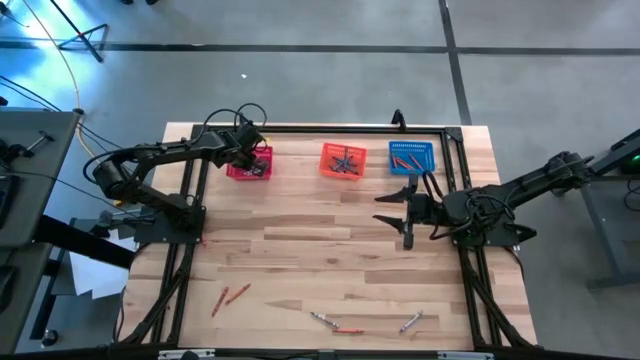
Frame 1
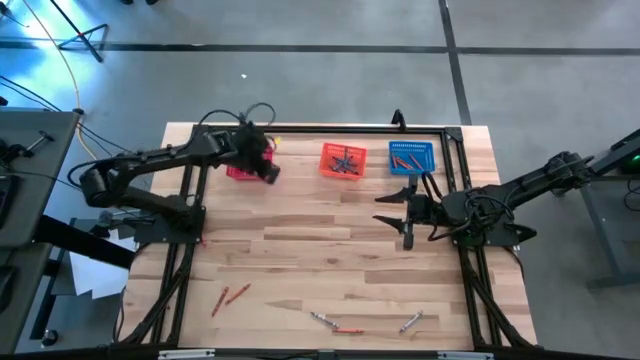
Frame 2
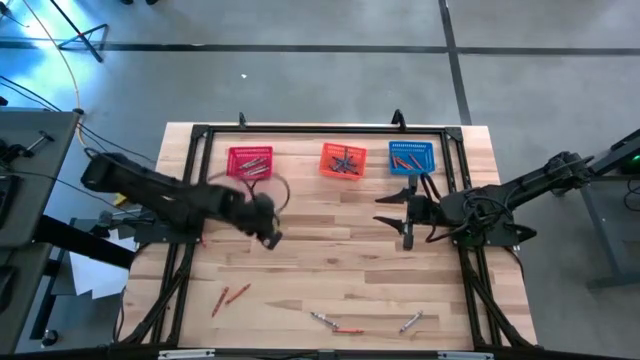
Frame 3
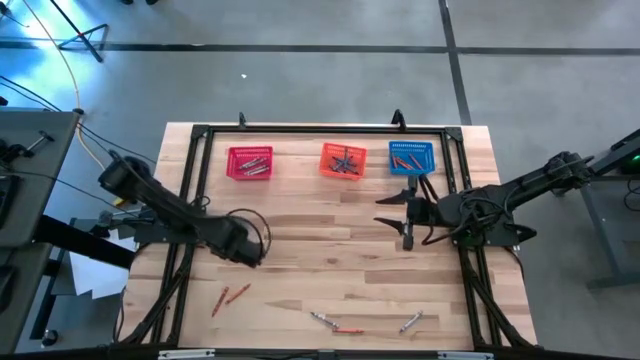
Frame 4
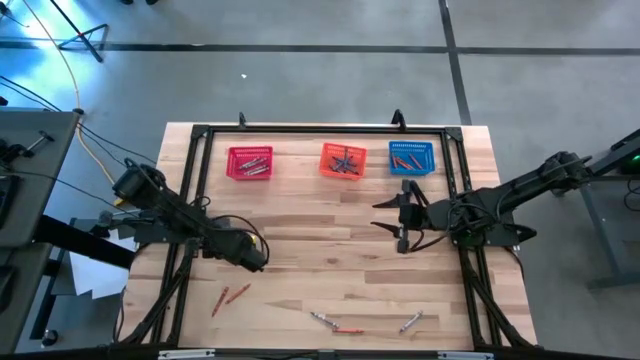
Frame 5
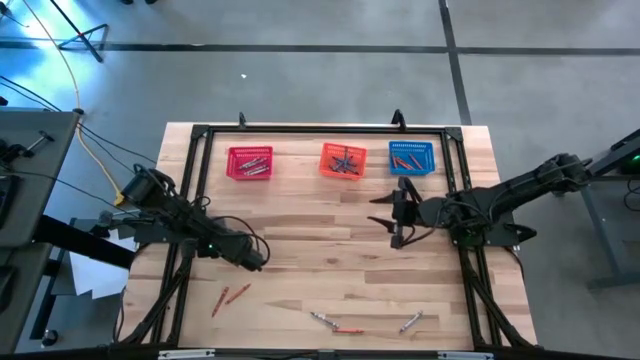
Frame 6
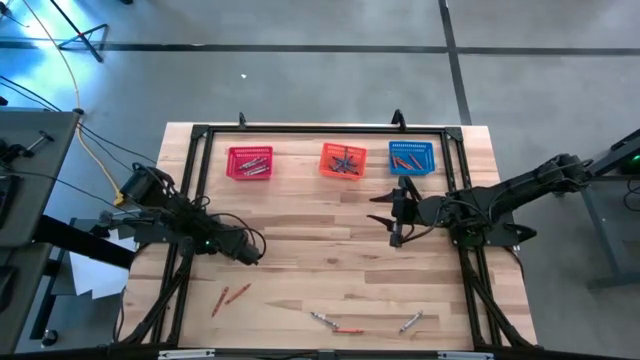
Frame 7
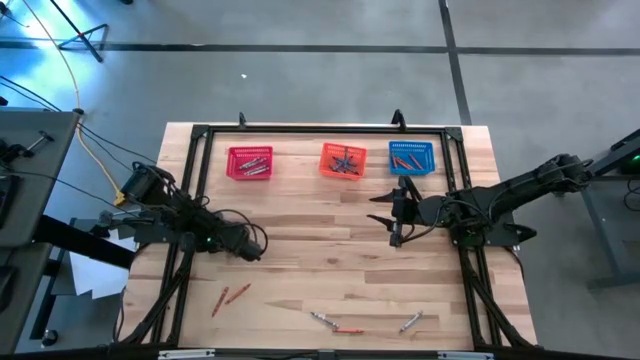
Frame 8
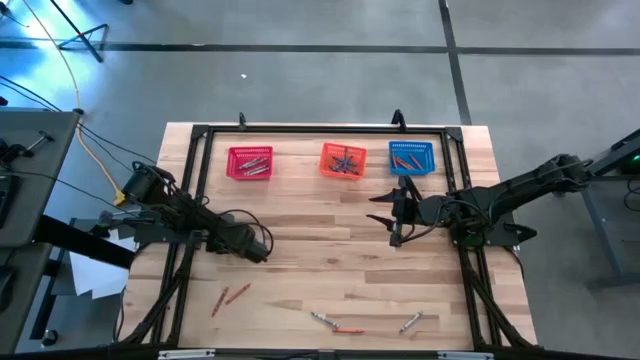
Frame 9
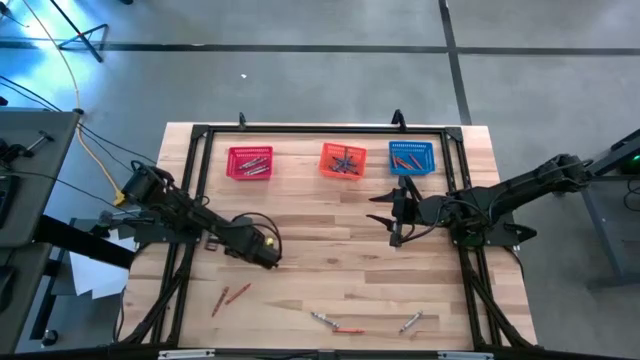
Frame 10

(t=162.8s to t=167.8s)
Task: Sort crayons
Put the orange crayon into the blue bin

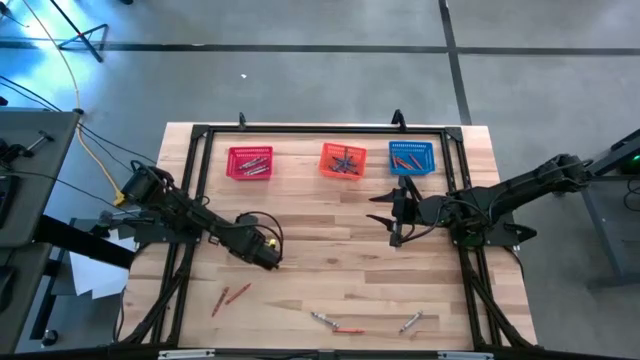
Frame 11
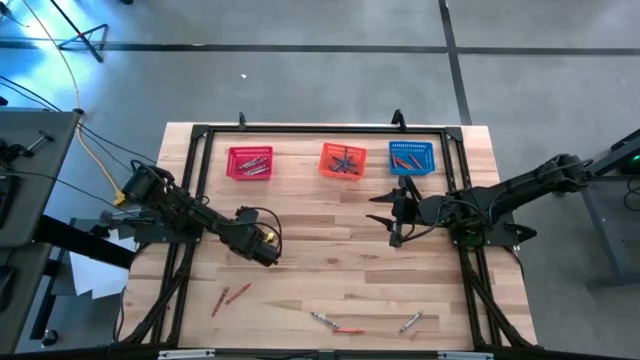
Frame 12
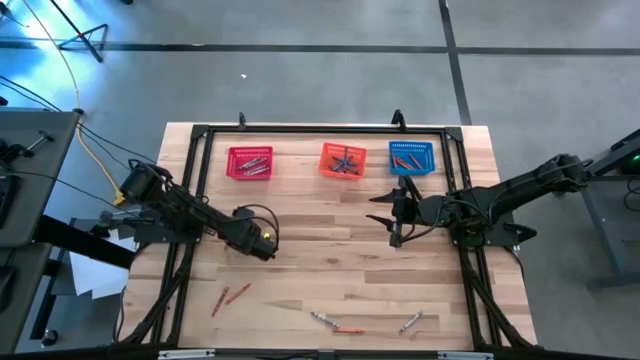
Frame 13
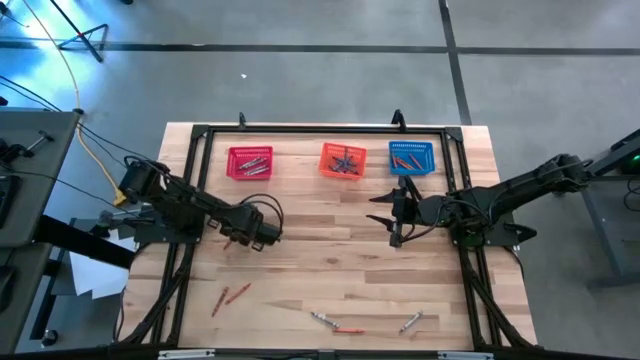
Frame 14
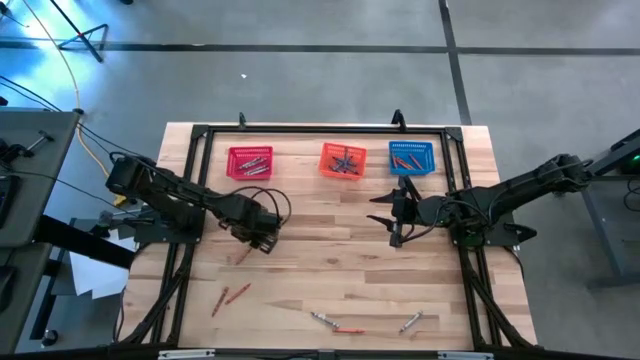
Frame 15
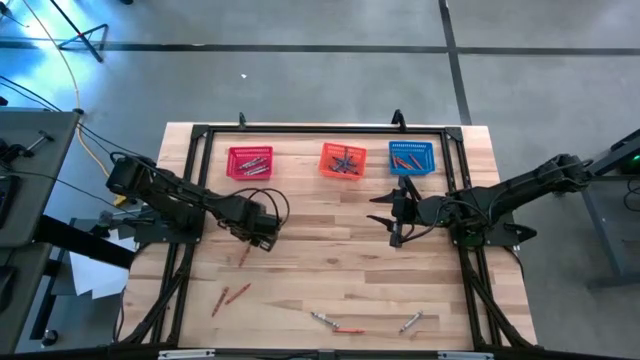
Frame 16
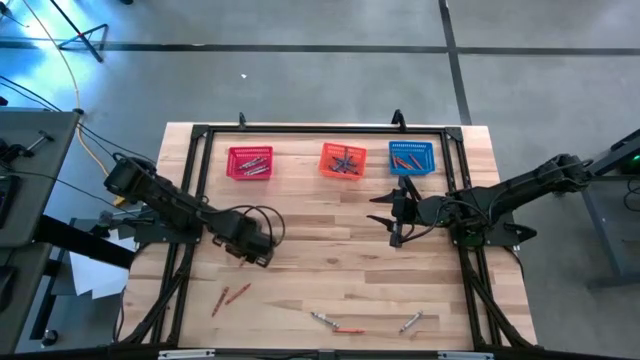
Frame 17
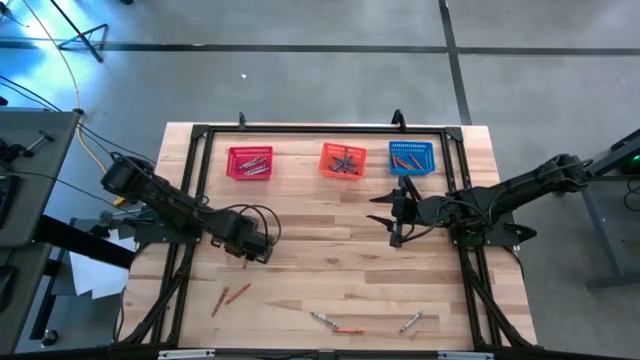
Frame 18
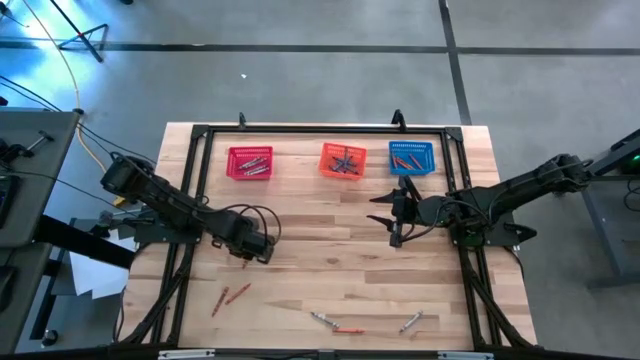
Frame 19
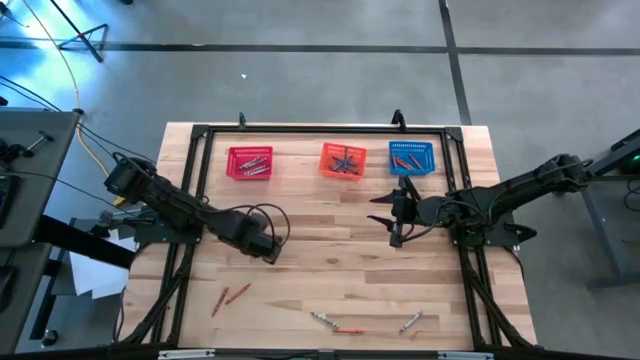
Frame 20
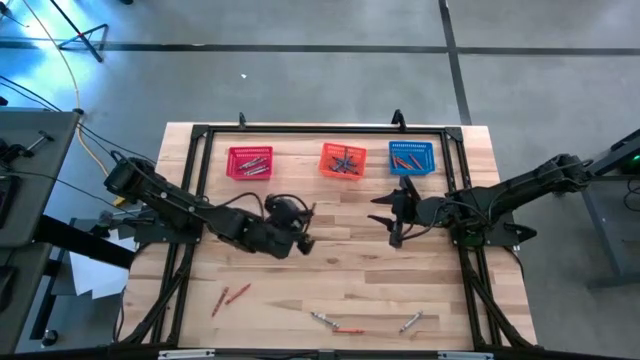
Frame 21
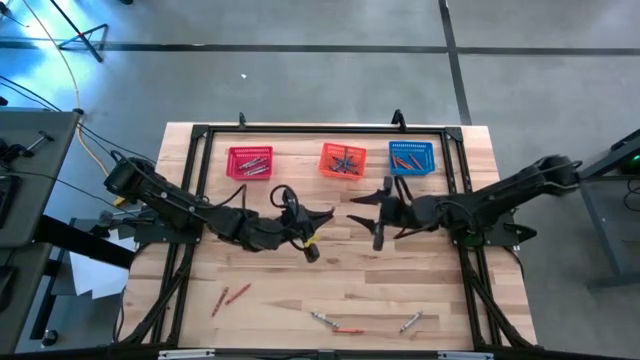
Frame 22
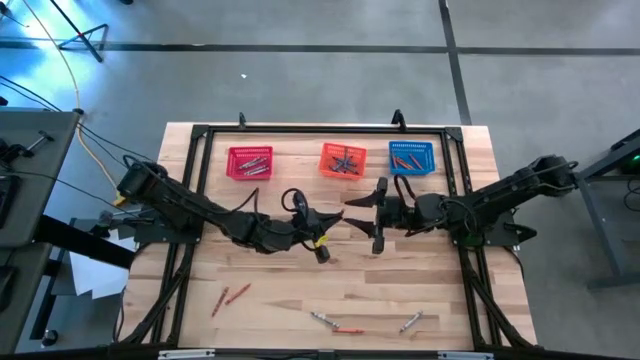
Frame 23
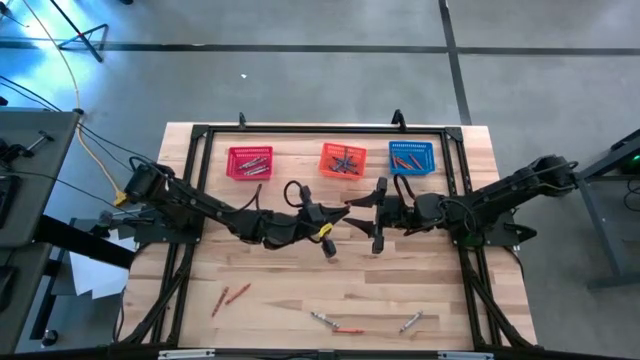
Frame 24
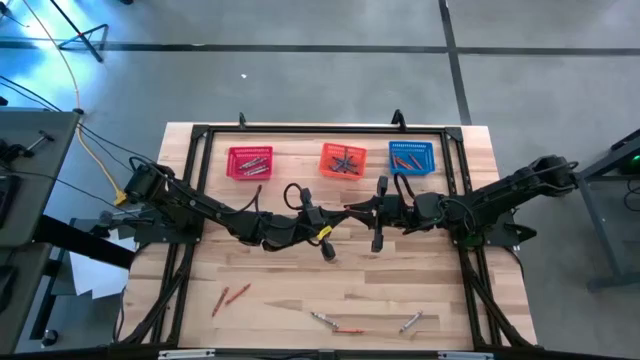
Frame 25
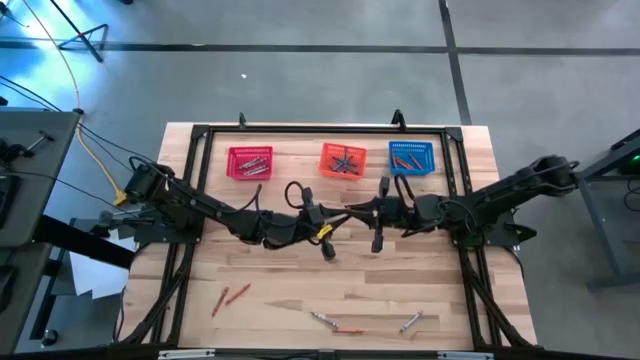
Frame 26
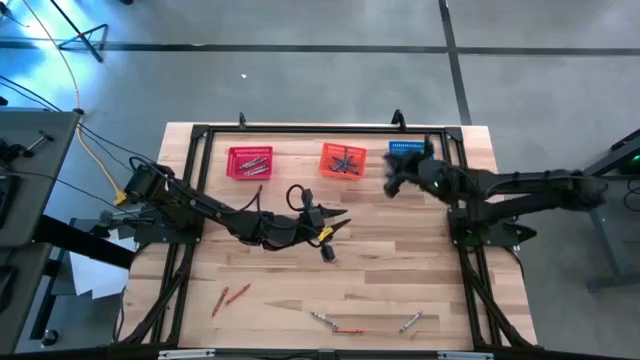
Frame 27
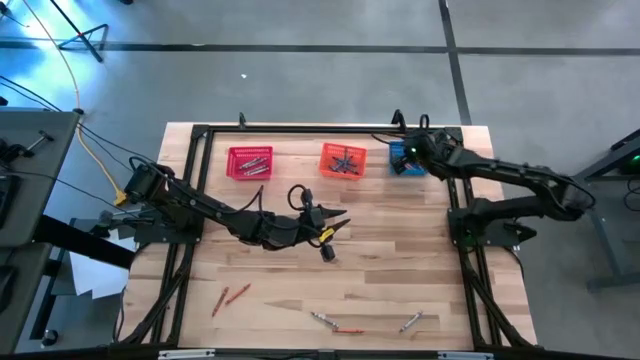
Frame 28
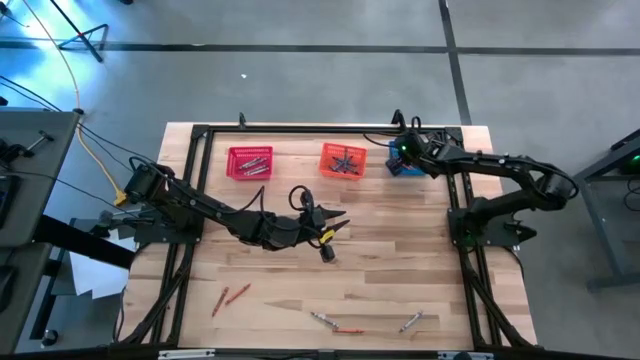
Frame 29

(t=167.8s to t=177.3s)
Put the orange crayon into the blue bin

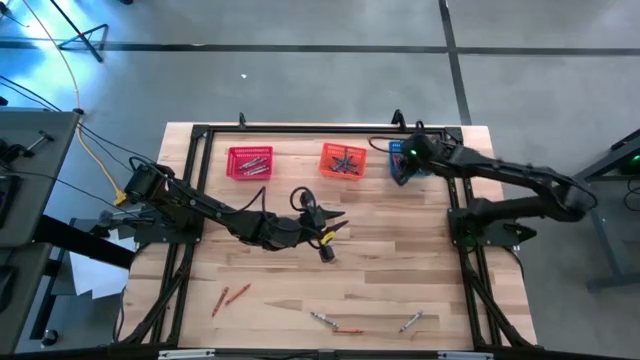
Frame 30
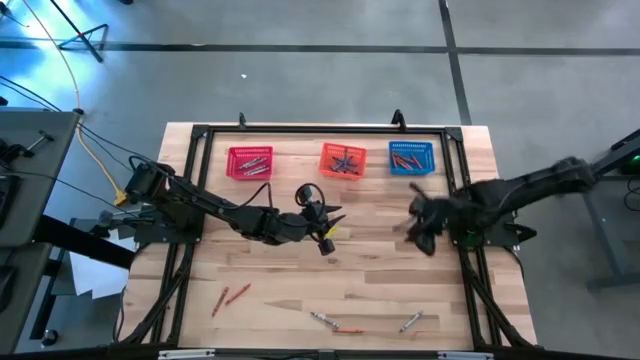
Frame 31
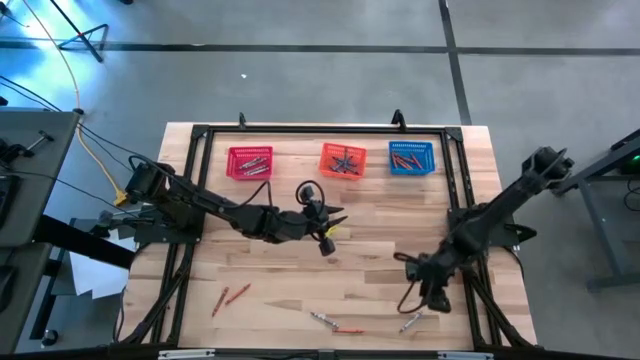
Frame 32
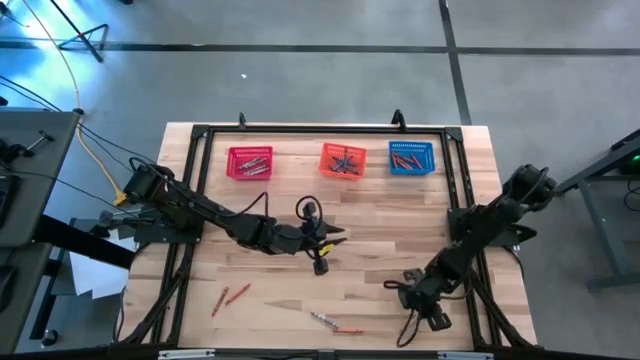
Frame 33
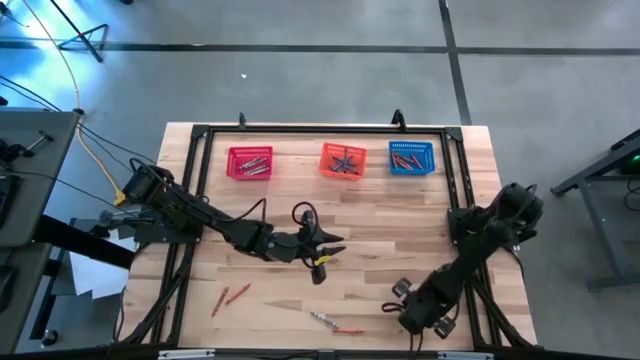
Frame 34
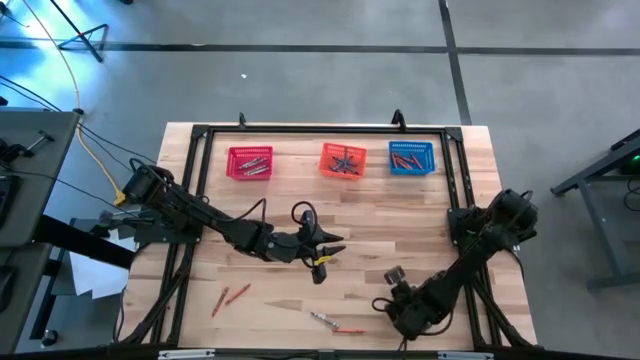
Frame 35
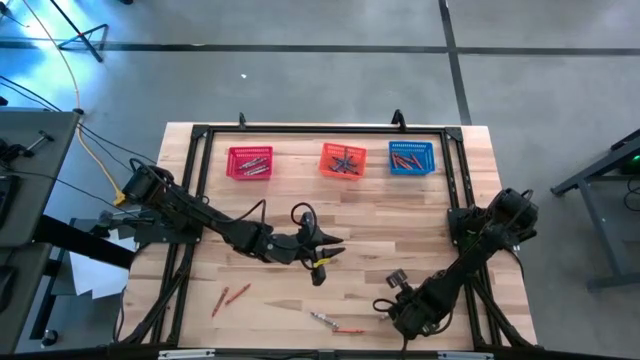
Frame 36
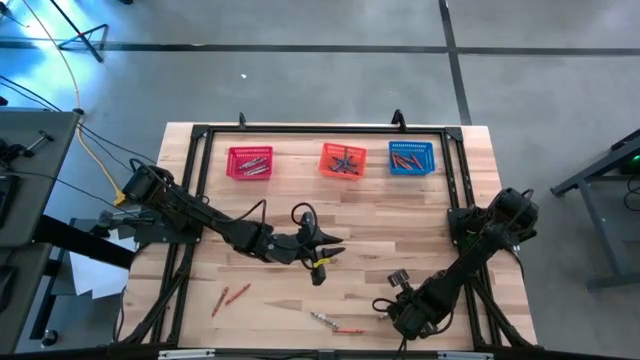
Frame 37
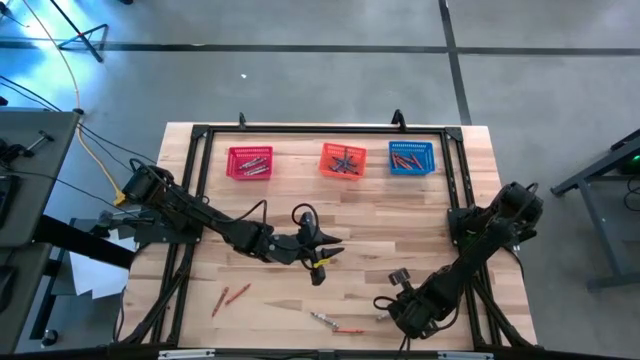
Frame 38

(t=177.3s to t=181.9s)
Put the gray crayon into the red bin
